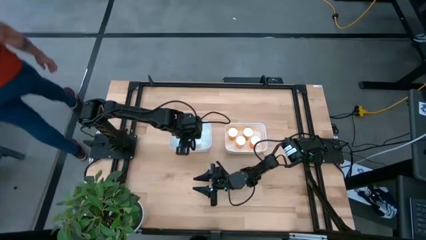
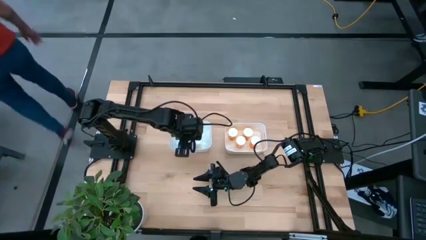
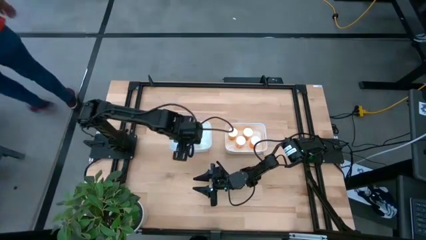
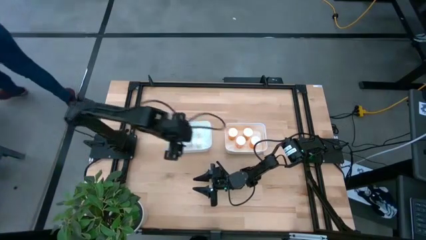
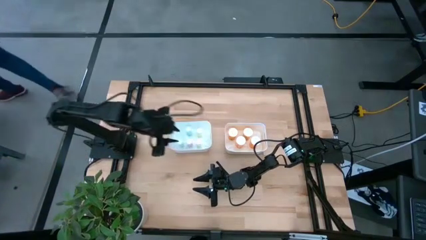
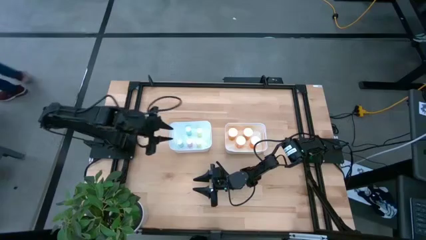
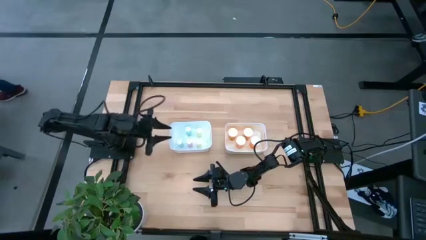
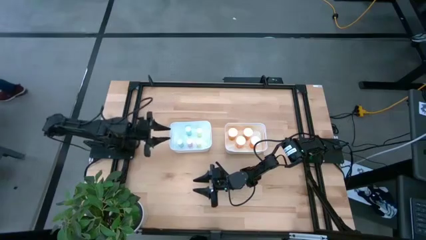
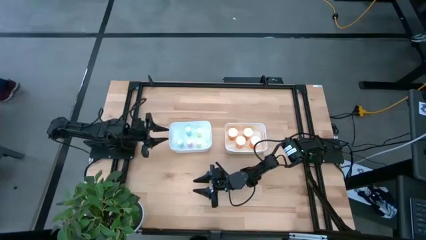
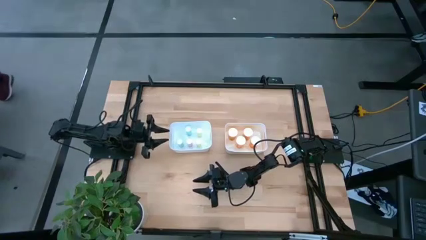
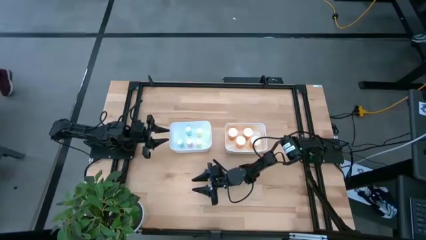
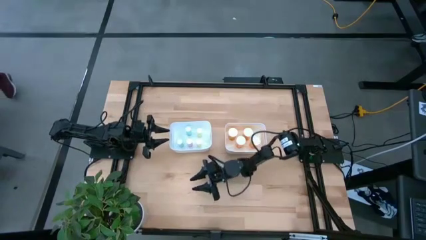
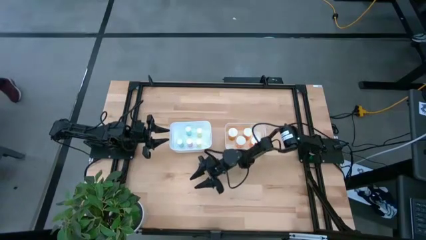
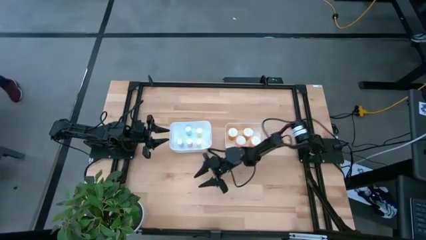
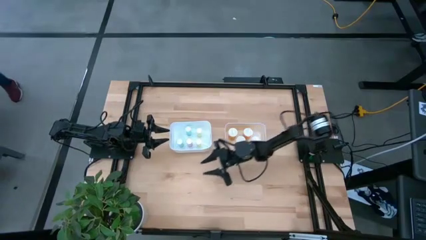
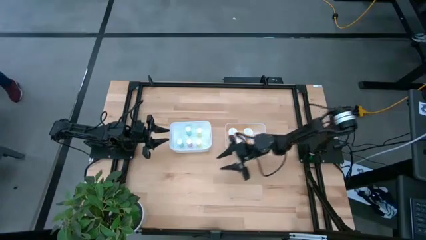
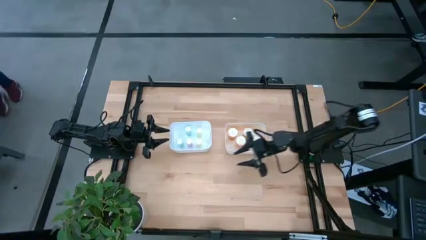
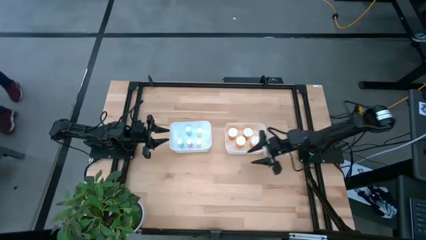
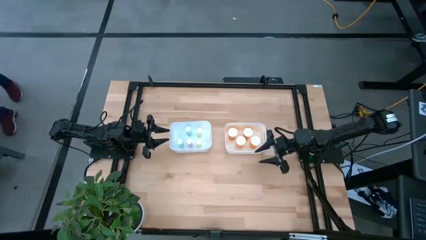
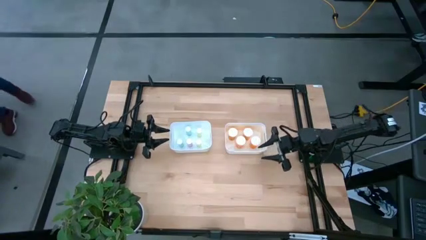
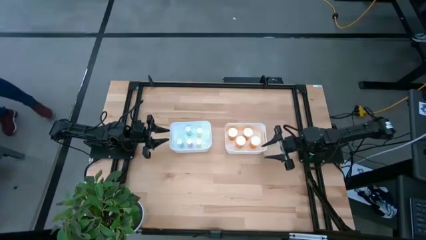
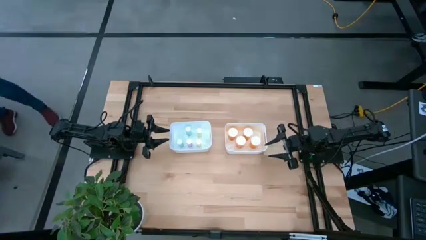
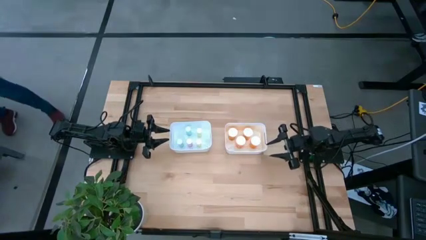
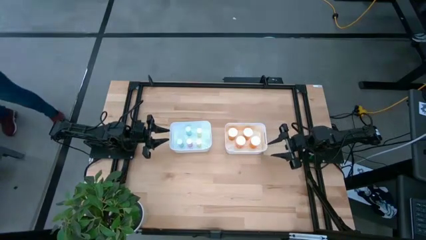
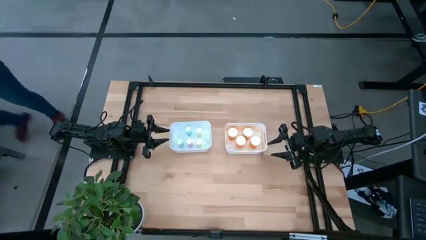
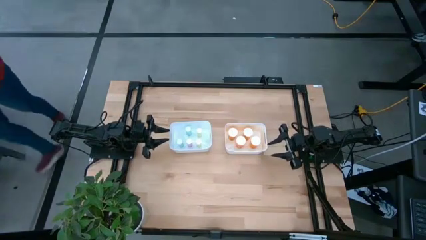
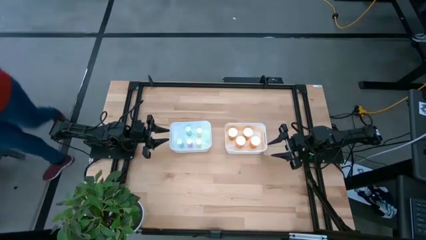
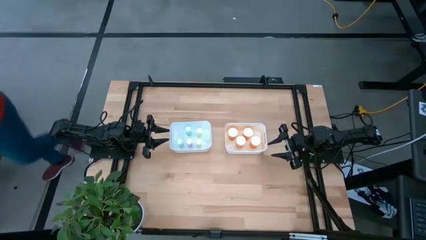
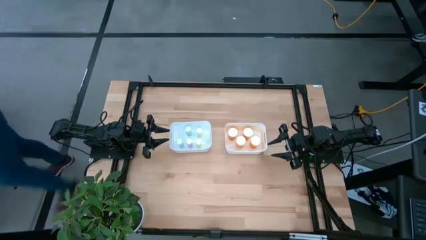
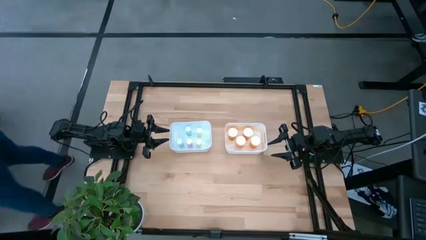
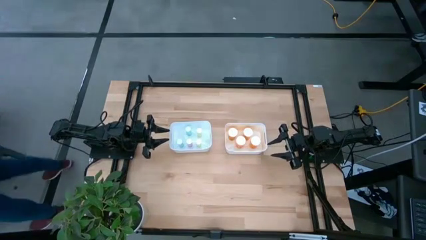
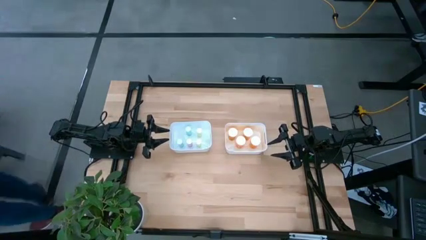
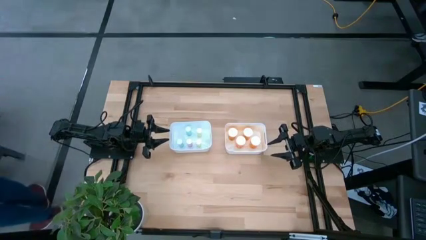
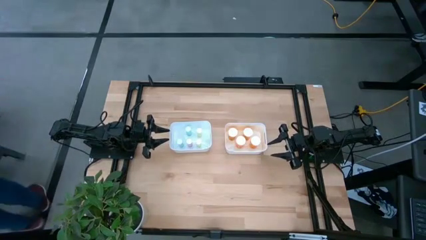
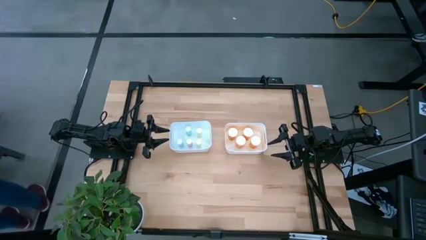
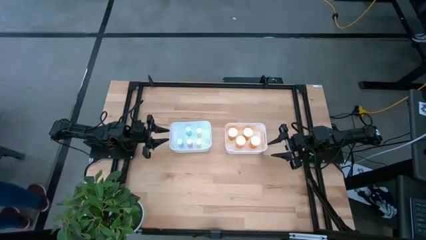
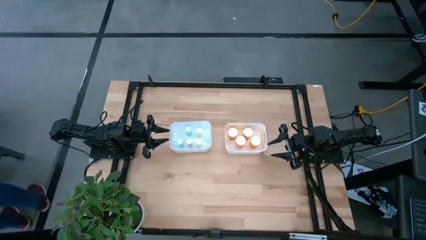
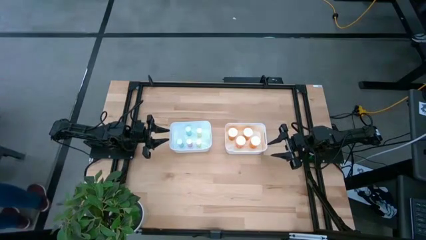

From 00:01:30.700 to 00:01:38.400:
Task: Pick and place medicine bottles into bin by pill shape (circle, oval)
Return to Home Position

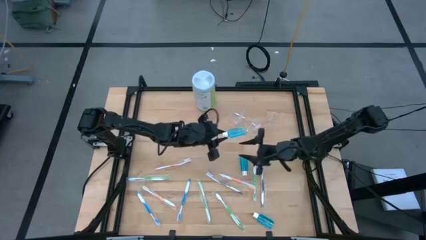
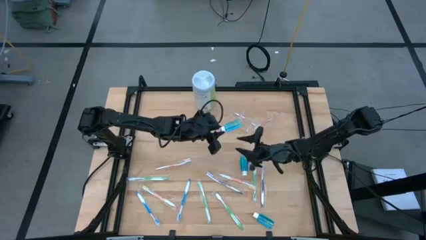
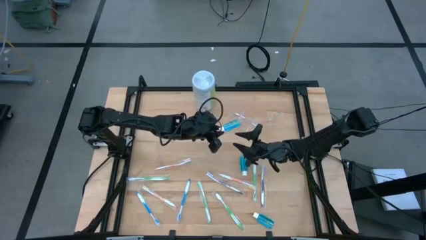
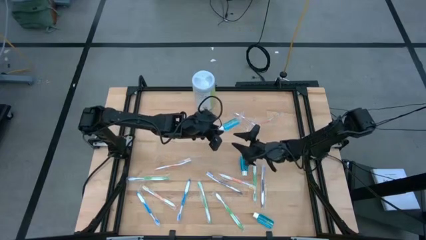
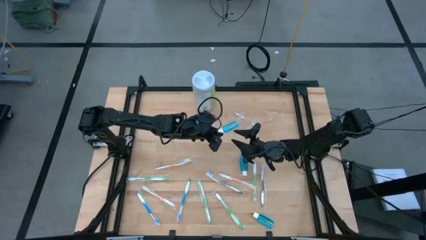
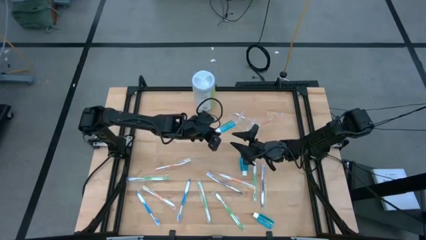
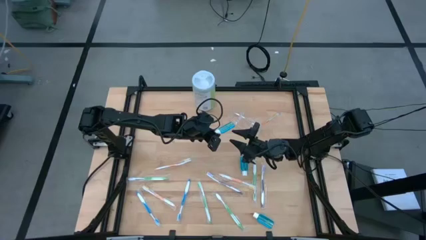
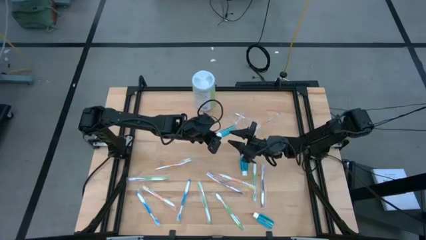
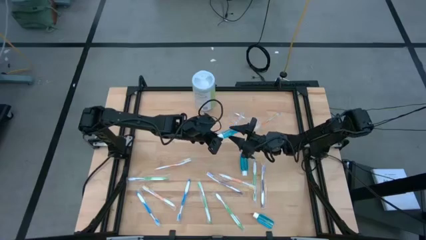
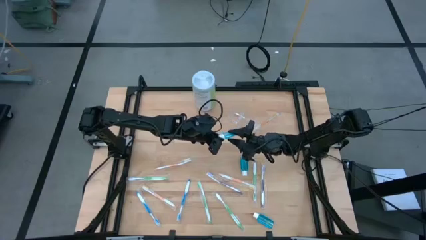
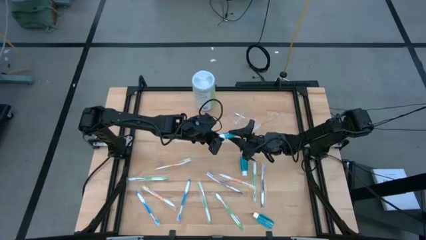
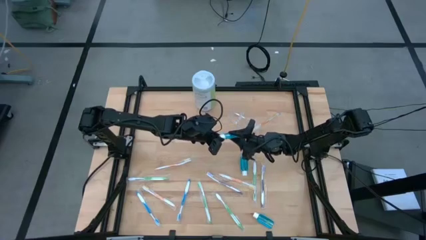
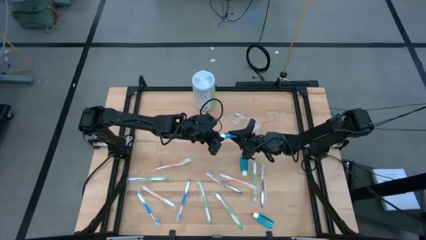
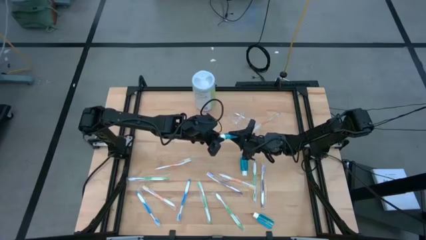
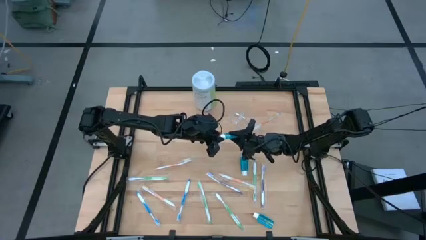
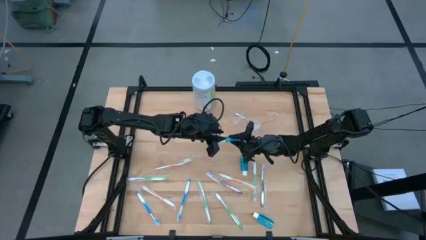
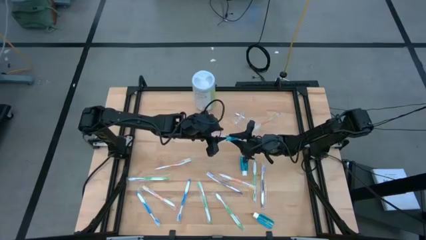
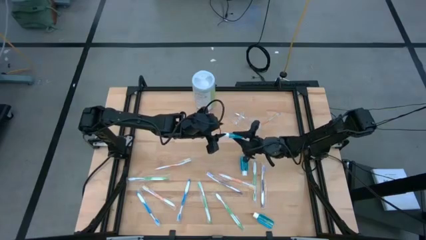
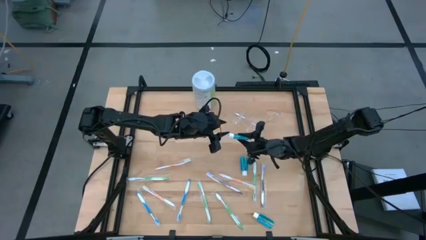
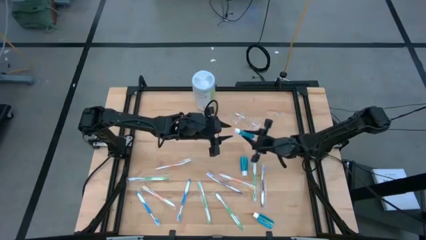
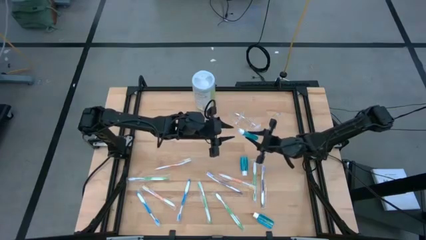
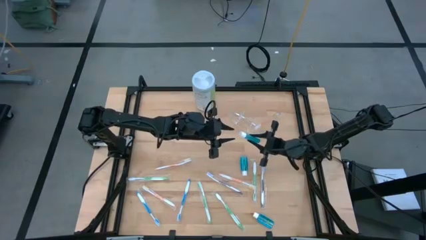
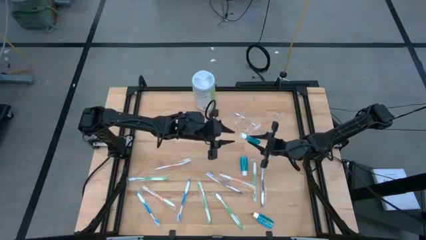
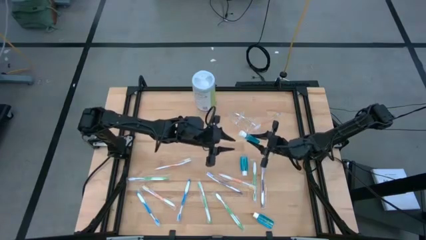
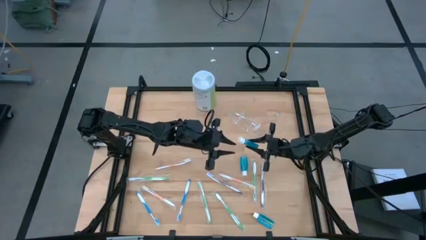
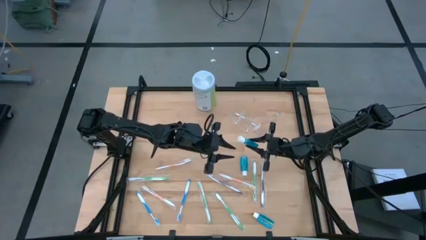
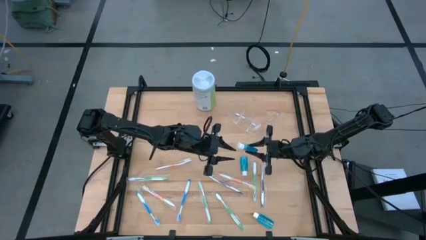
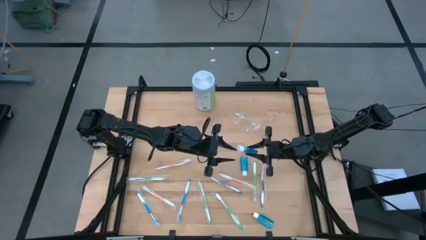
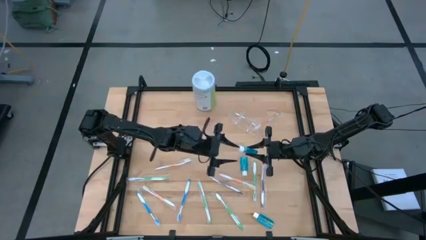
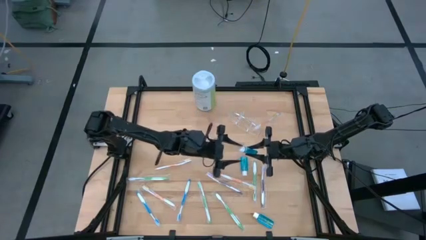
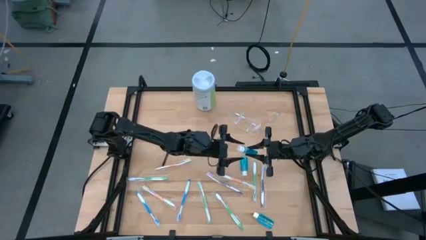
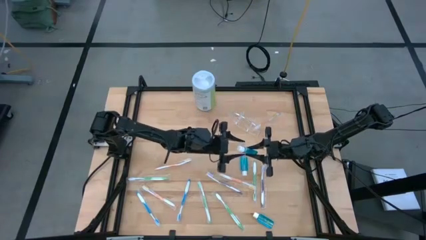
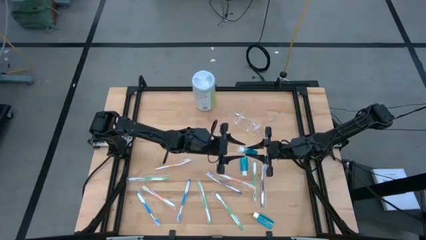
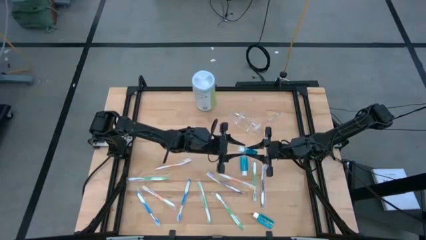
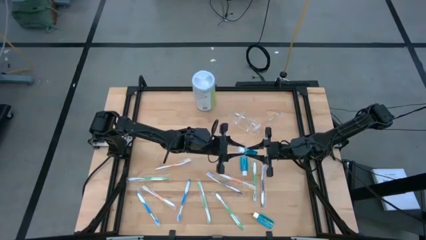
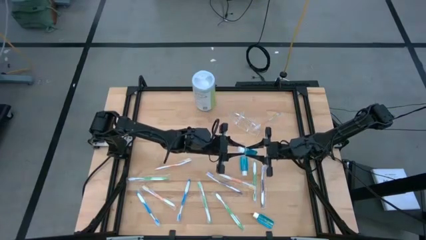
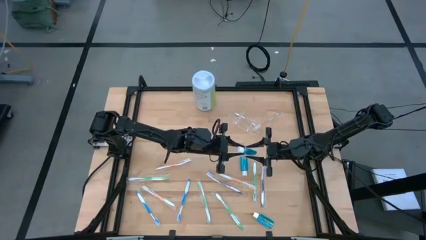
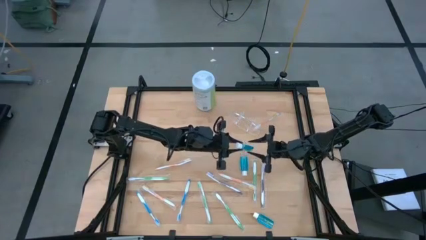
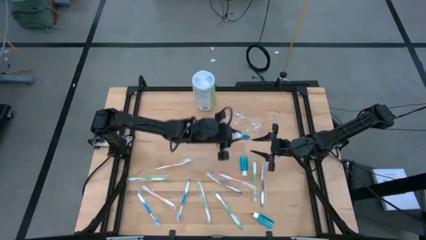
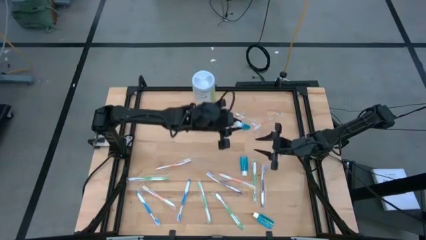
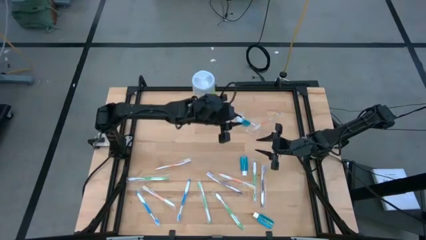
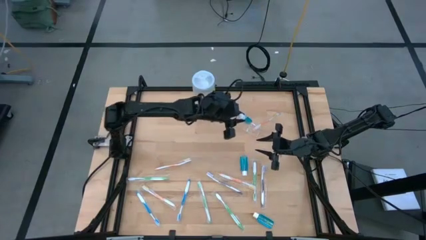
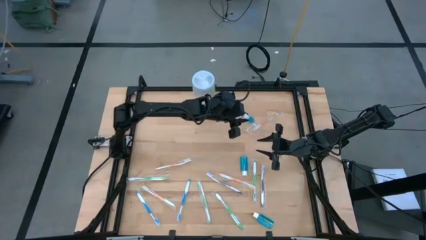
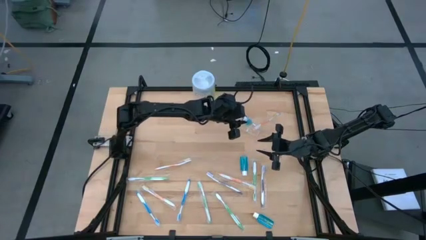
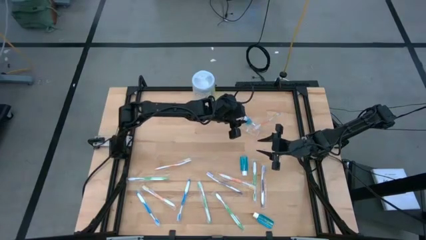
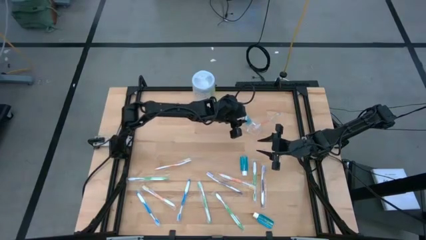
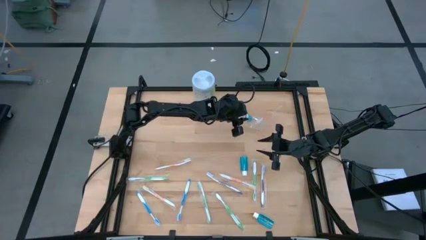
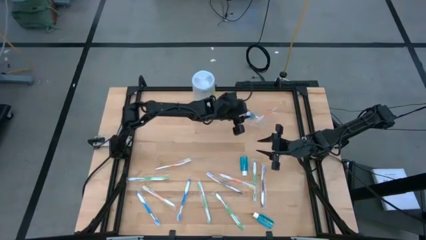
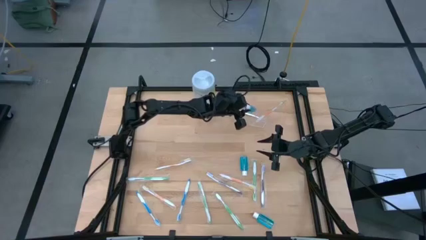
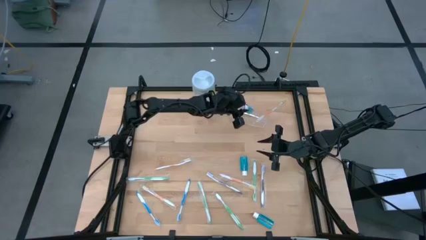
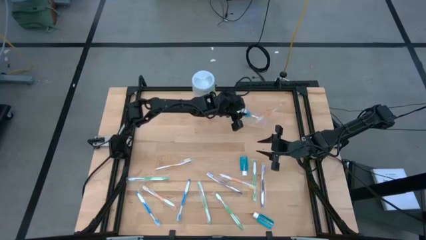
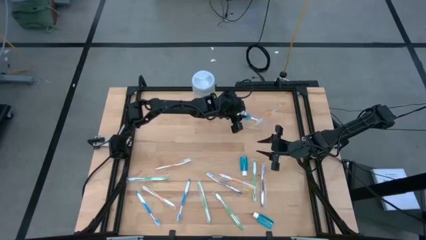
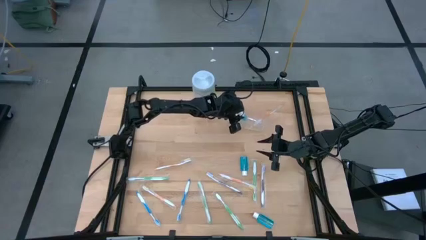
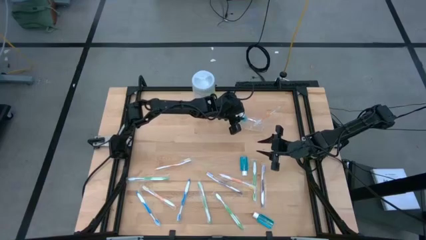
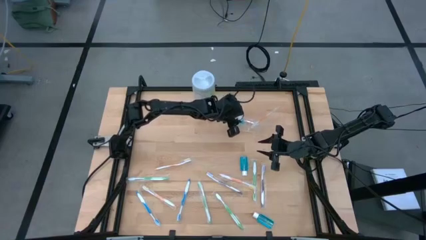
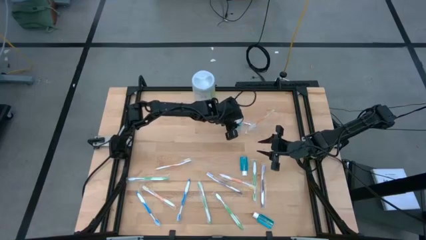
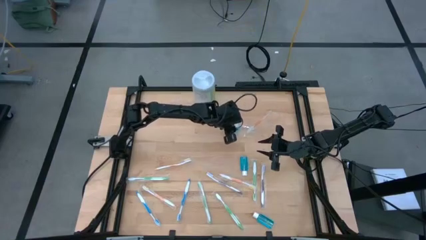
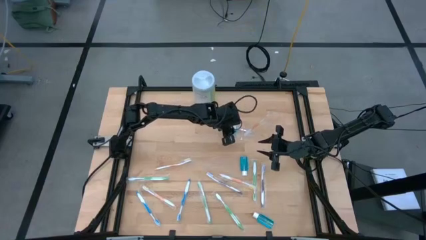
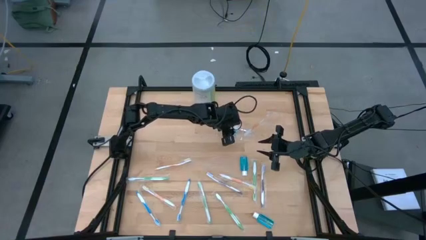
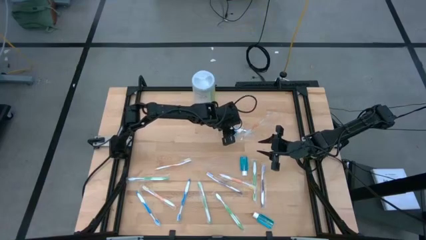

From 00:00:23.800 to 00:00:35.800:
Task: Pick & Place toothbrushing station
Put the blue mouthwash into the transparent organizer
